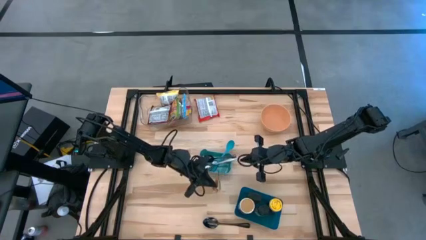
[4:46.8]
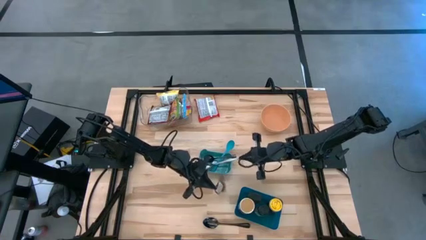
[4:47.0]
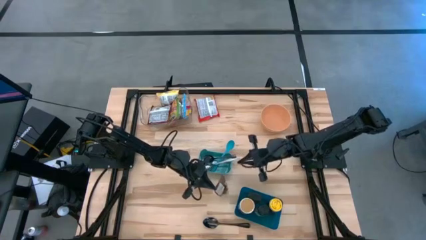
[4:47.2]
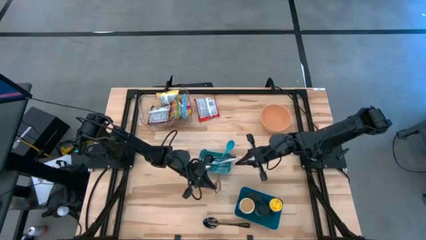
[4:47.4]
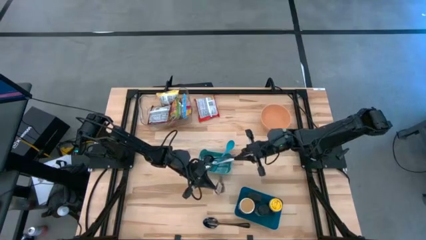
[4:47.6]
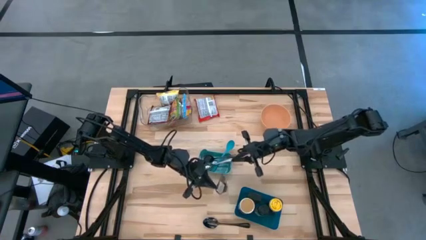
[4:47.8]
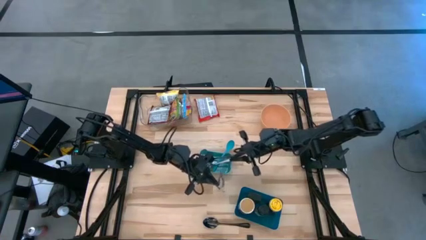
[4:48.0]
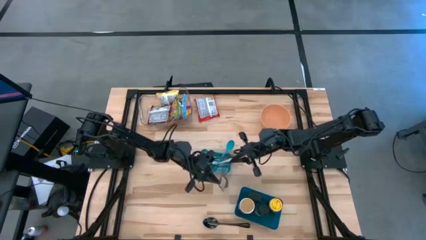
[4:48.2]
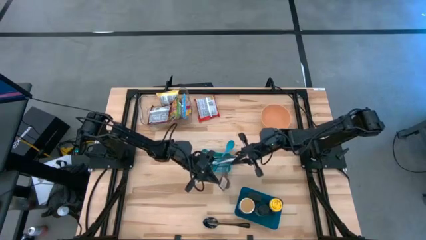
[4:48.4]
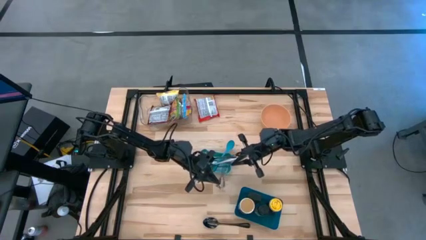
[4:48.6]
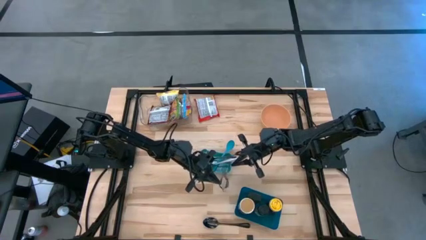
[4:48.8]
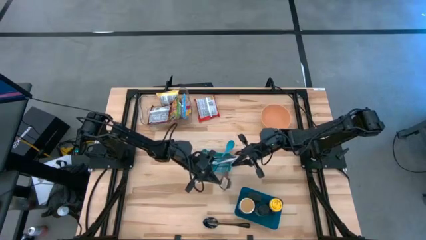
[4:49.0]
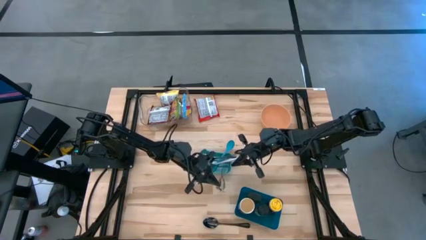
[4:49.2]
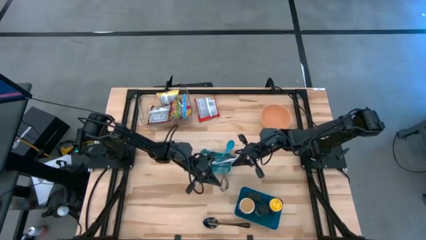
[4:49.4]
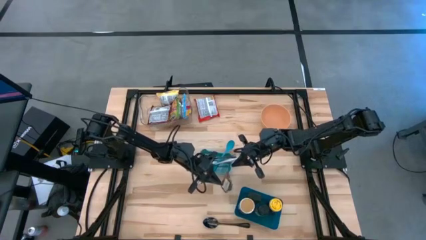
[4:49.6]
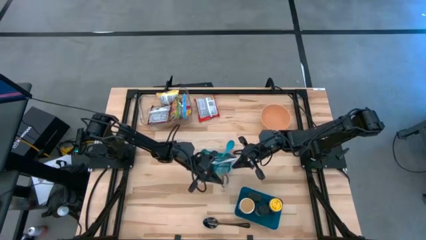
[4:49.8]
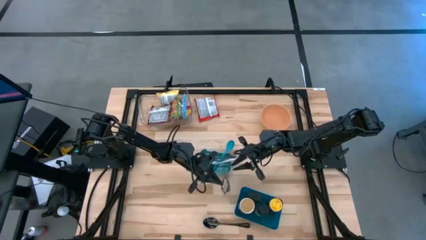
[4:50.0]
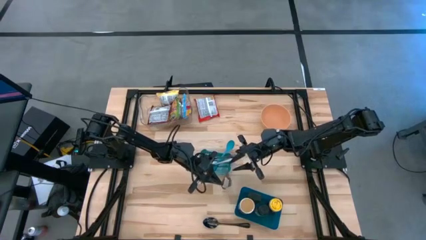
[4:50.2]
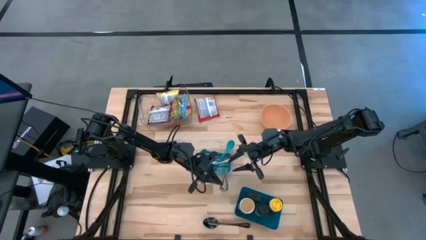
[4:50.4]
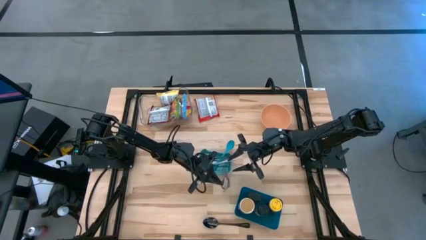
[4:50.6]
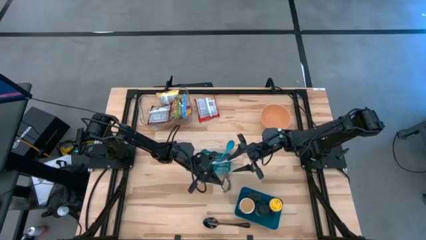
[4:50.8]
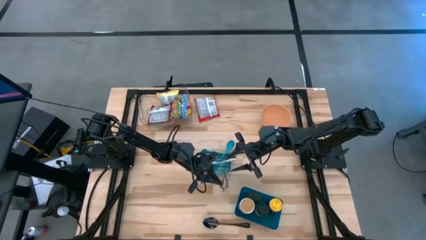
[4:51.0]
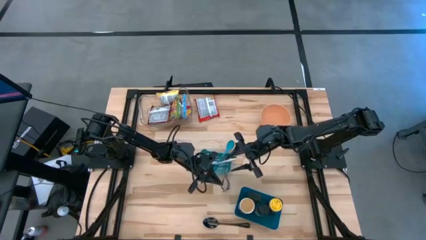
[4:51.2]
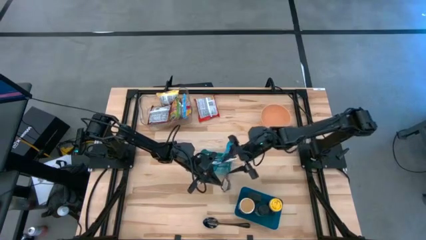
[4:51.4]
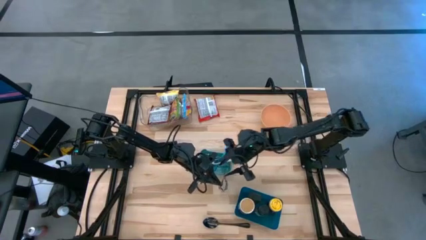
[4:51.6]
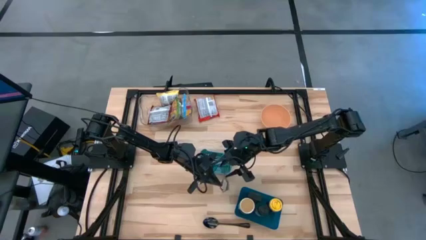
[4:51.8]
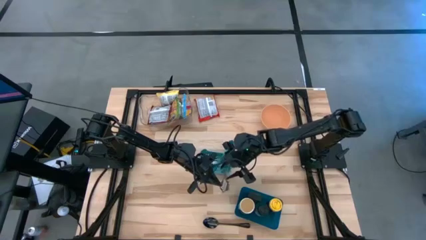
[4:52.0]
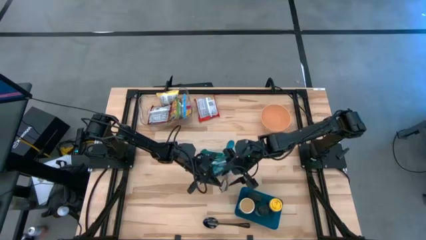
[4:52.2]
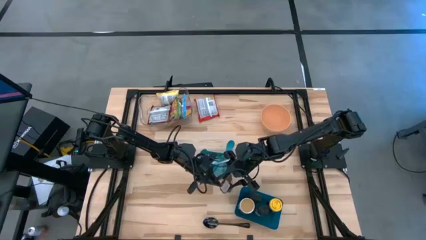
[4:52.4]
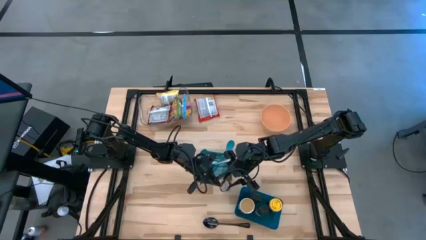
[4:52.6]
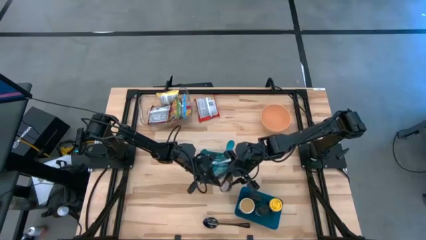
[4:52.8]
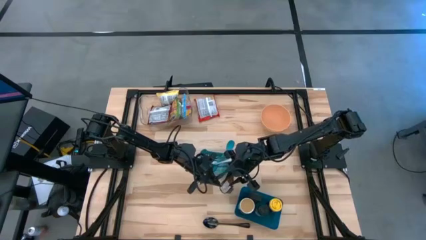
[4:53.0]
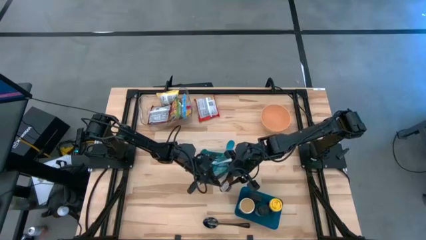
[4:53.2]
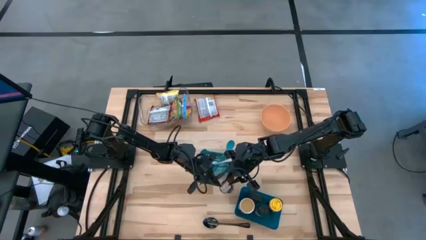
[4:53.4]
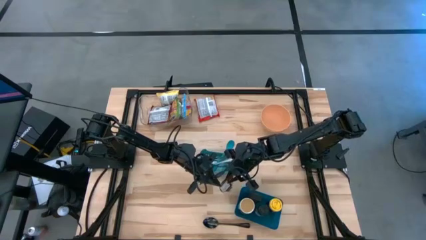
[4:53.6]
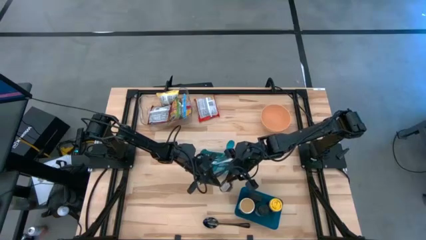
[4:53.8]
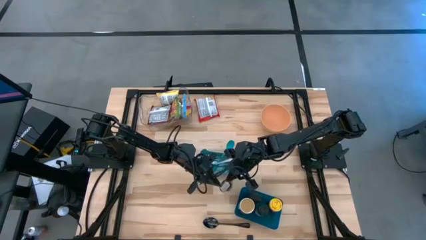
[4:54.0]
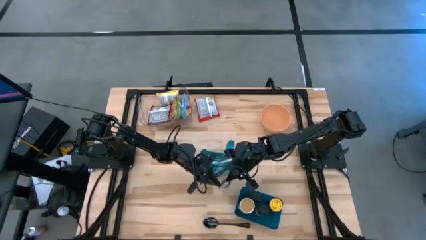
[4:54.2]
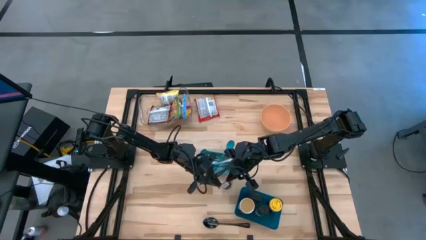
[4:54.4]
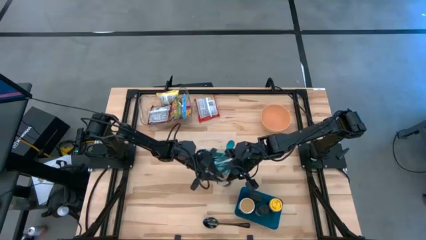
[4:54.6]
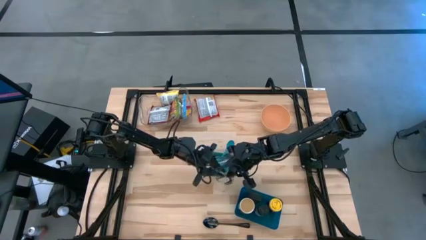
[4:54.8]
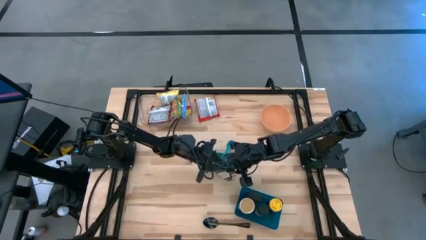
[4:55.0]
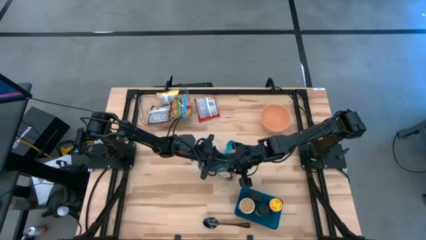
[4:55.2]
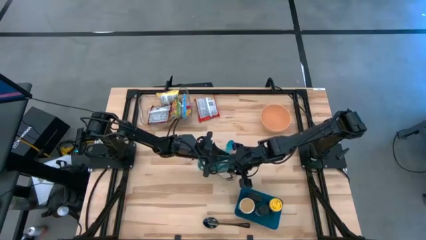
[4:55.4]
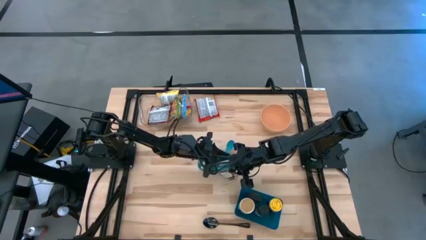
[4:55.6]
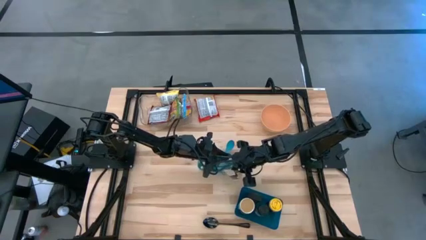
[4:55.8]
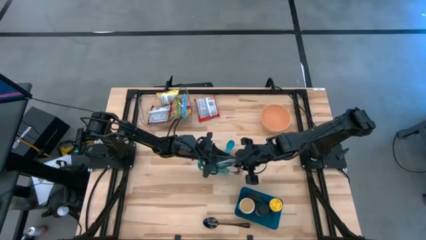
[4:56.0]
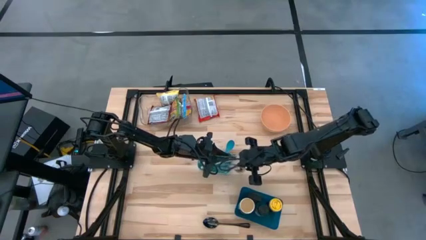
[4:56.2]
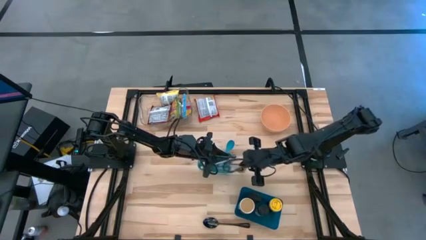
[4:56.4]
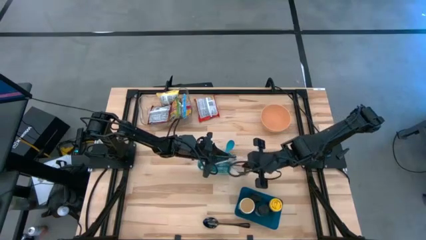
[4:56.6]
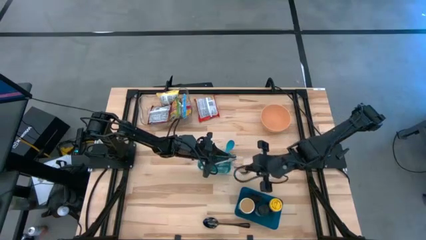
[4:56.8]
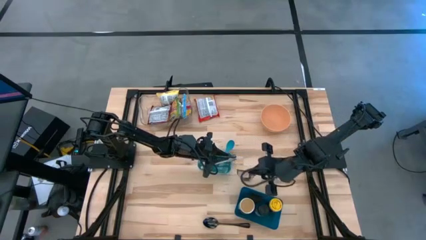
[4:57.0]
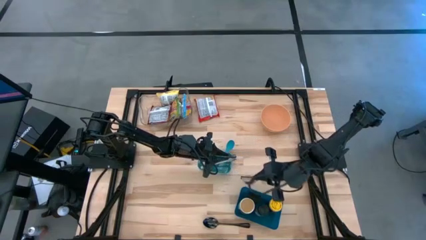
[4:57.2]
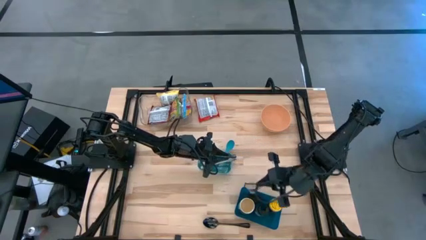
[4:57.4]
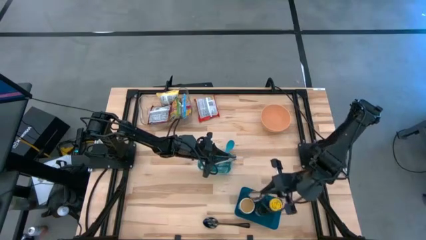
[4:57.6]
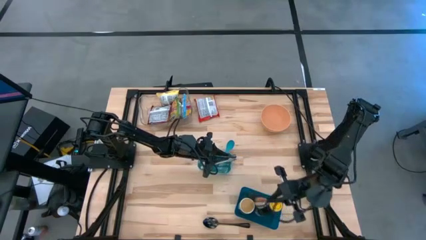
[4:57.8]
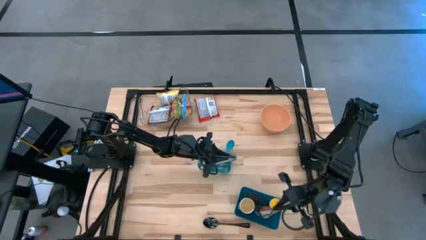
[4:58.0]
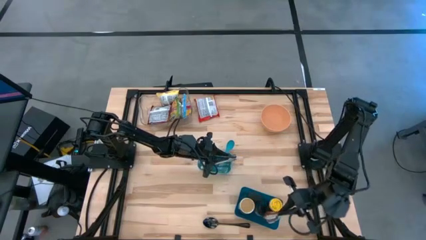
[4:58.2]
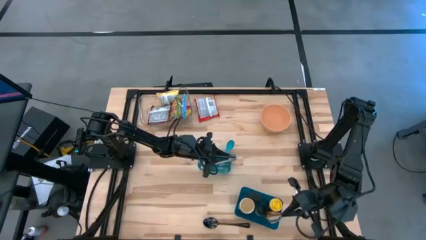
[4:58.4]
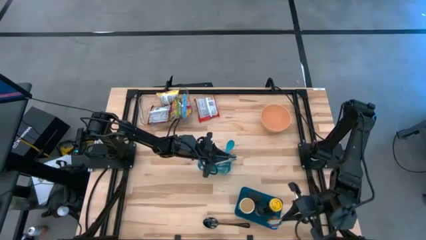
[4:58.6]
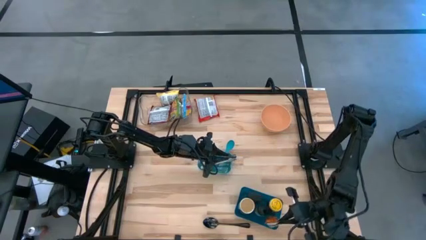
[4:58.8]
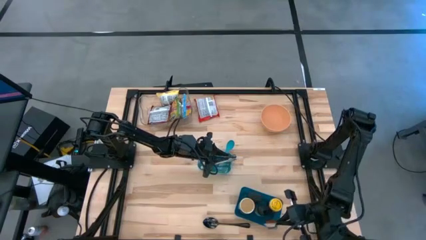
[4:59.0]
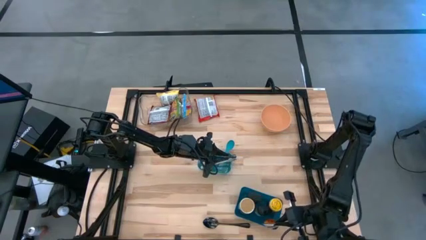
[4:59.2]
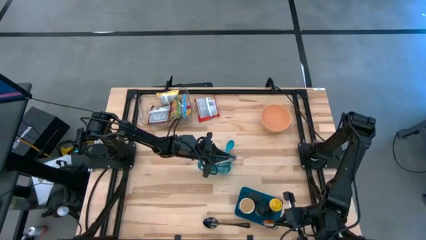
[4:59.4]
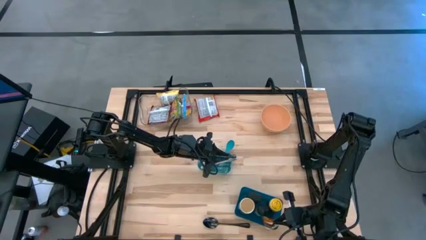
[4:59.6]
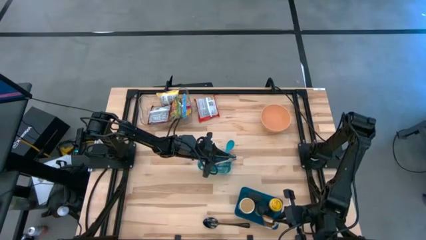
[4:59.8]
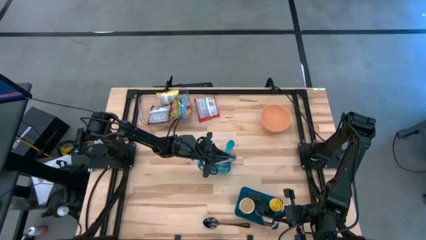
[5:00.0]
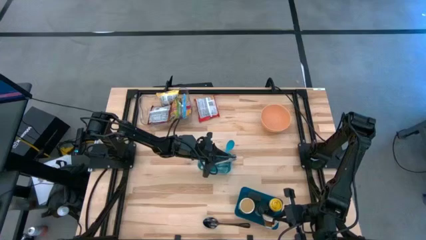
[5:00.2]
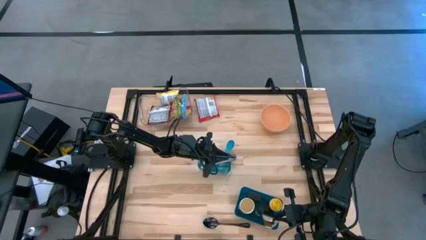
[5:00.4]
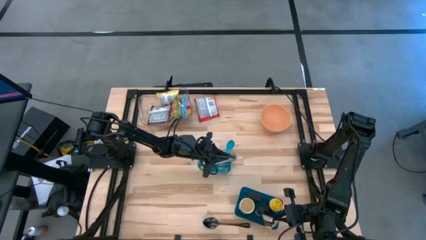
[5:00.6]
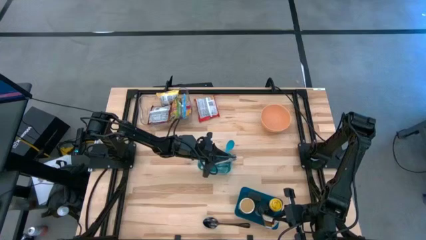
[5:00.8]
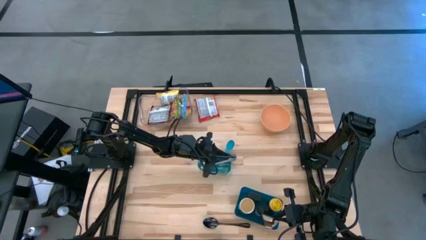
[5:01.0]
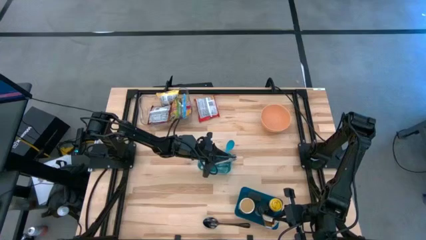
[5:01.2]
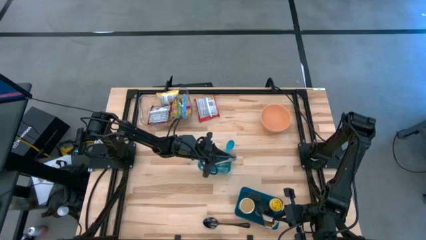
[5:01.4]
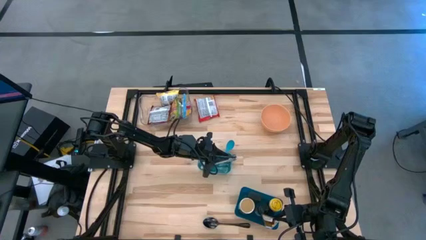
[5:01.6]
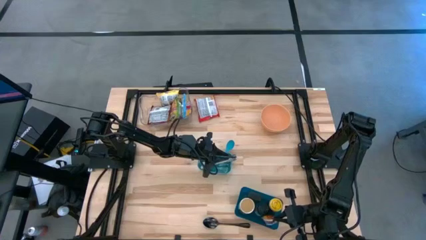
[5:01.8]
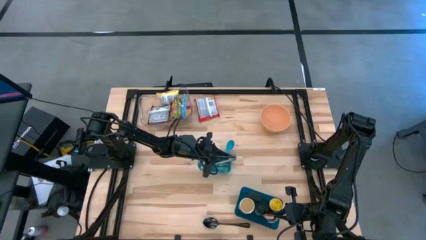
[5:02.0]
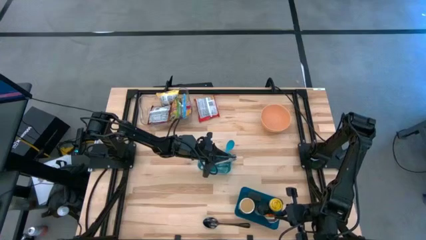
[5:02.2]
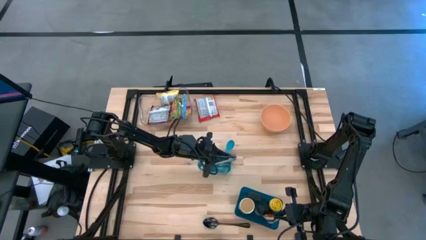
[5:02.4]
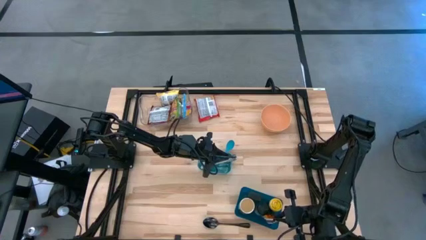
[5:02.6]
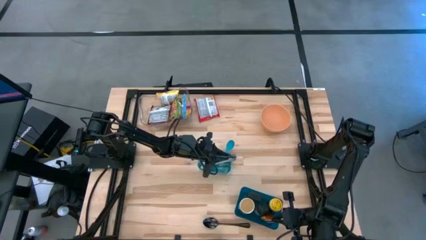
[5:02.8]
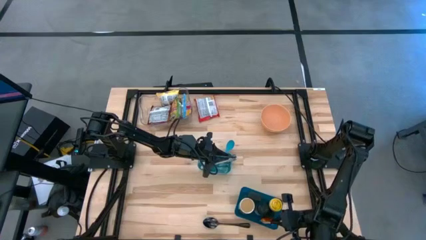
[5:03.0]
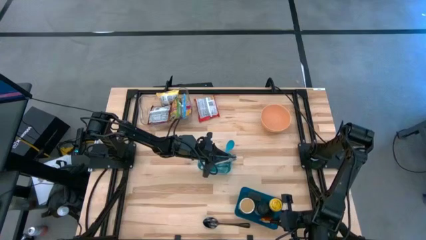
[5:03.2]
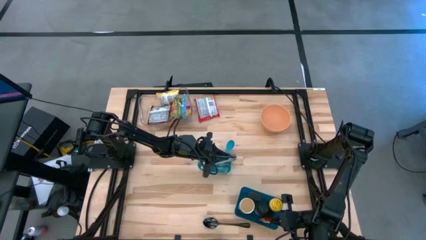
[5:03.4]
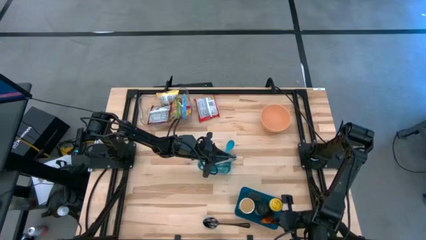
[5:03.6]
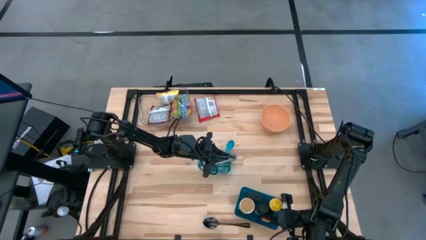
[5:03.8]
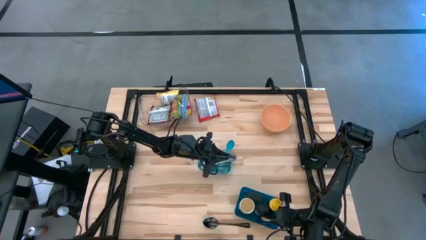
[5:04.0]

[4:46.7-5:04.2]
Task: Pick & Place Food Item
Put the orange seasoning pack into the blue bin
